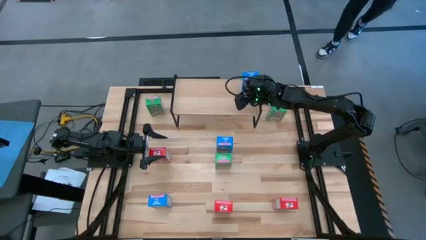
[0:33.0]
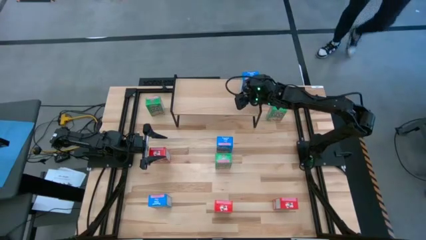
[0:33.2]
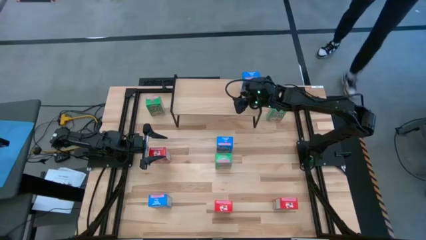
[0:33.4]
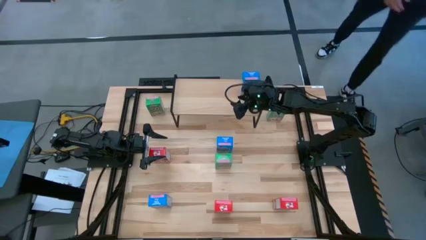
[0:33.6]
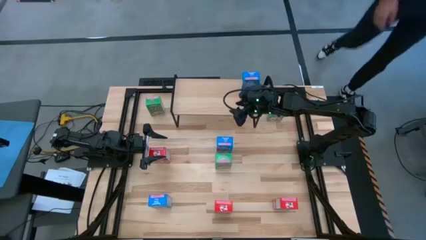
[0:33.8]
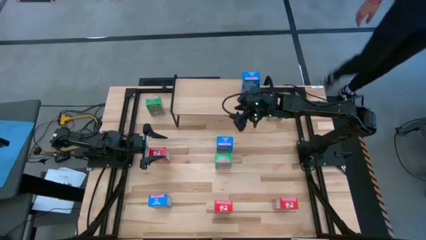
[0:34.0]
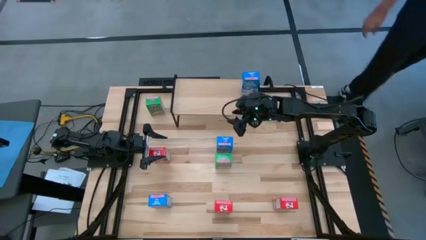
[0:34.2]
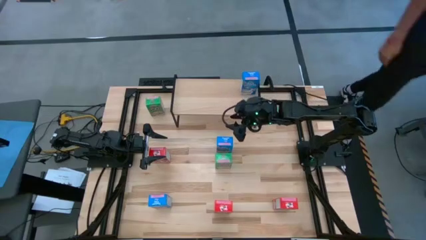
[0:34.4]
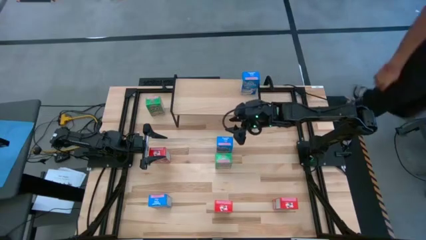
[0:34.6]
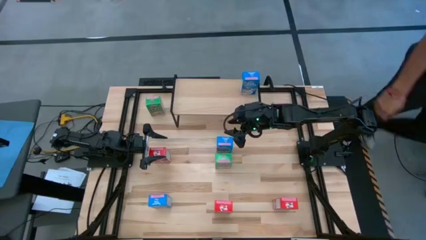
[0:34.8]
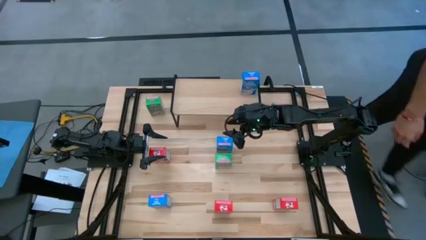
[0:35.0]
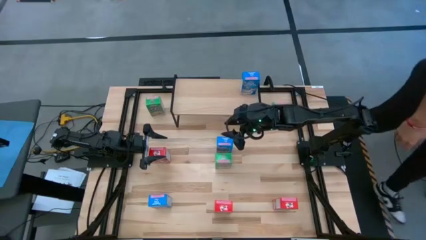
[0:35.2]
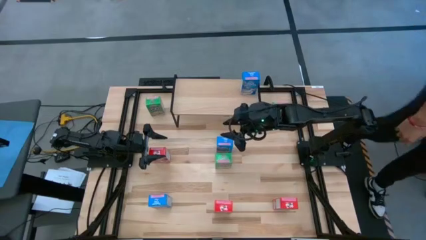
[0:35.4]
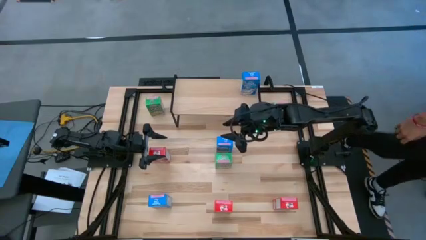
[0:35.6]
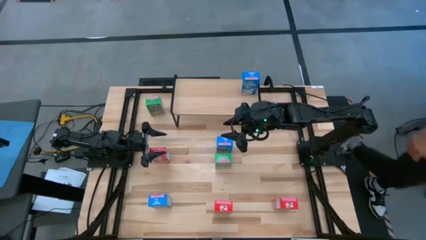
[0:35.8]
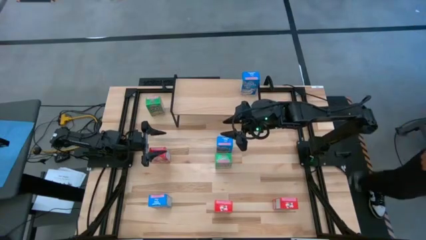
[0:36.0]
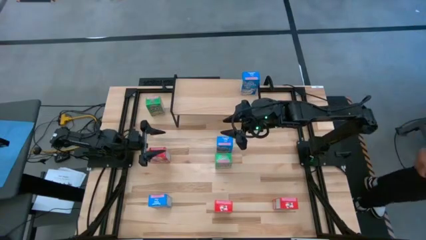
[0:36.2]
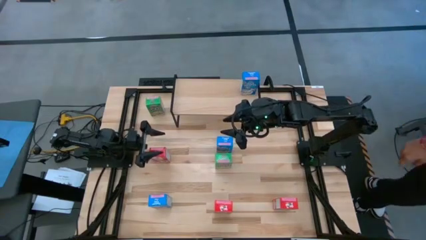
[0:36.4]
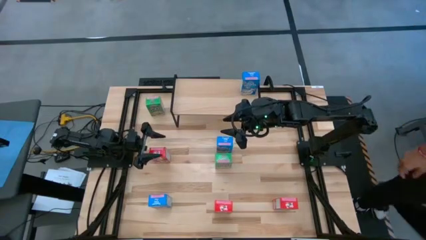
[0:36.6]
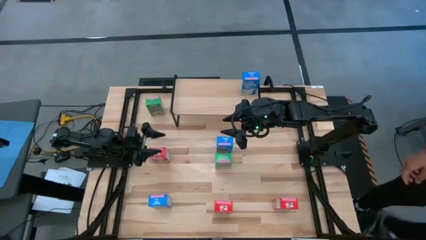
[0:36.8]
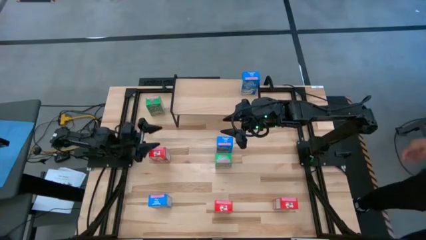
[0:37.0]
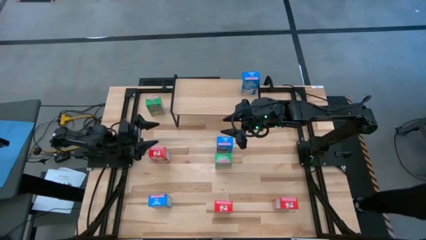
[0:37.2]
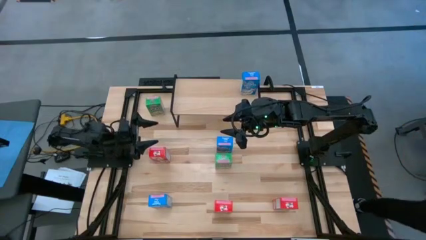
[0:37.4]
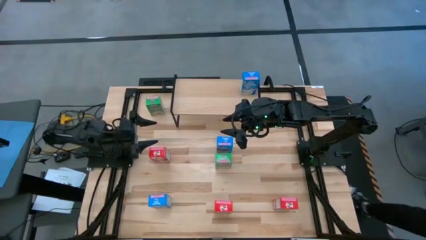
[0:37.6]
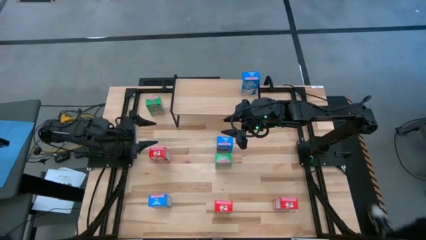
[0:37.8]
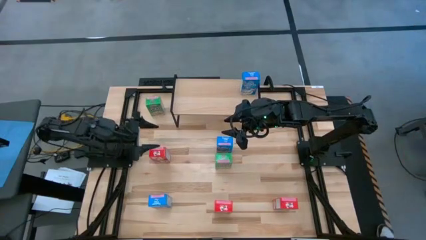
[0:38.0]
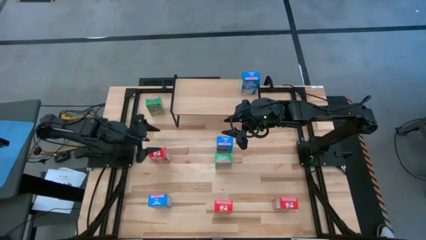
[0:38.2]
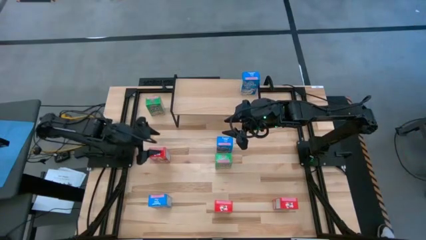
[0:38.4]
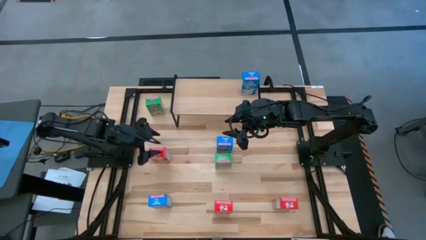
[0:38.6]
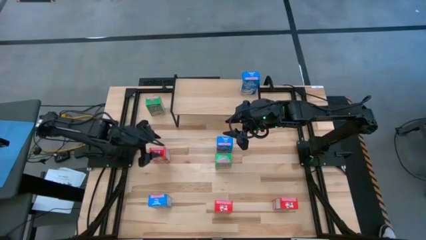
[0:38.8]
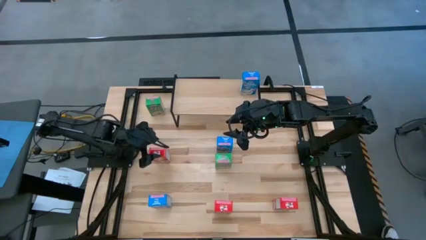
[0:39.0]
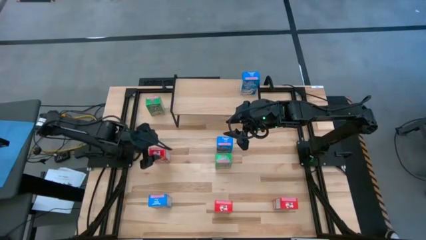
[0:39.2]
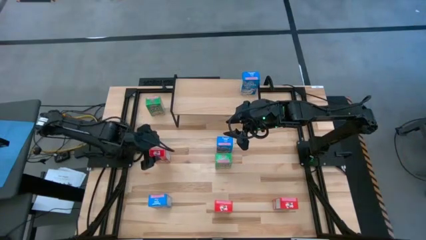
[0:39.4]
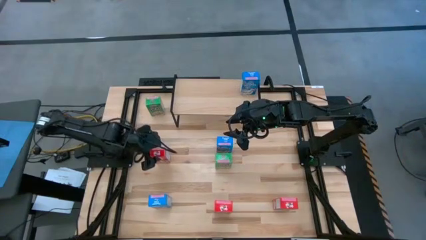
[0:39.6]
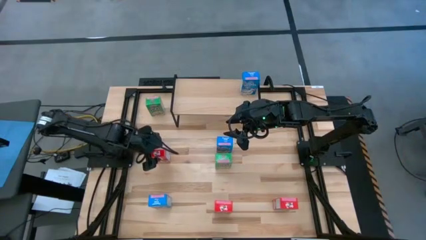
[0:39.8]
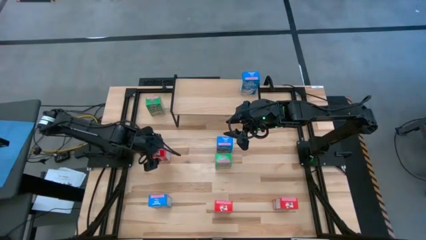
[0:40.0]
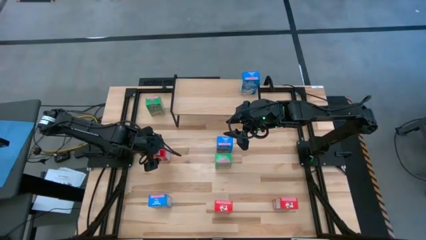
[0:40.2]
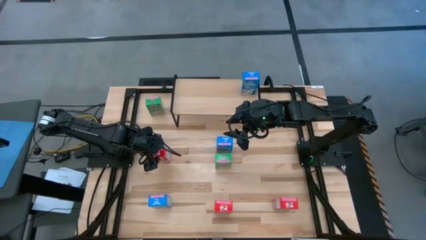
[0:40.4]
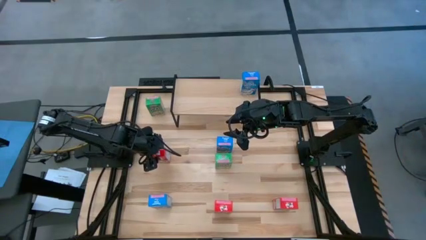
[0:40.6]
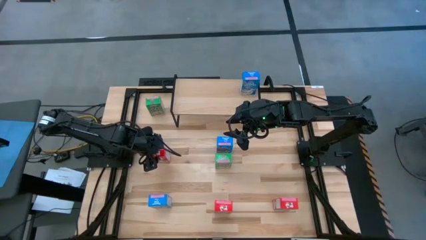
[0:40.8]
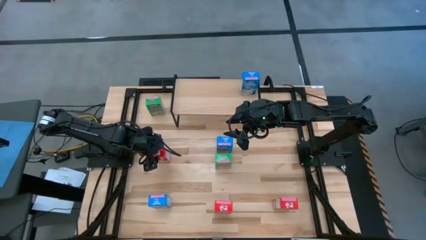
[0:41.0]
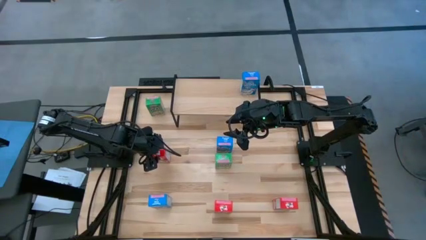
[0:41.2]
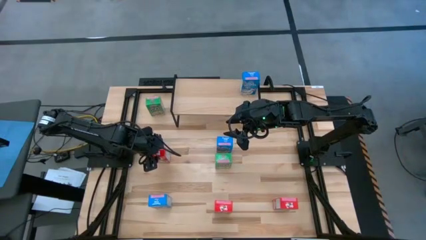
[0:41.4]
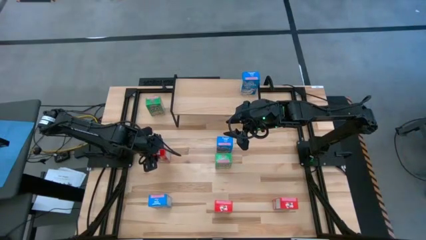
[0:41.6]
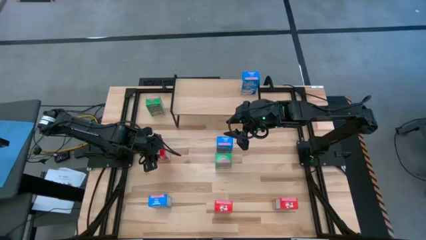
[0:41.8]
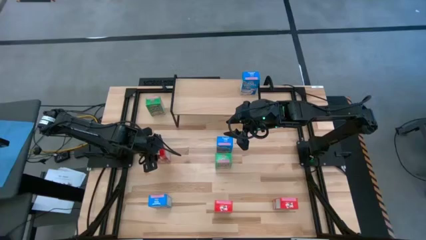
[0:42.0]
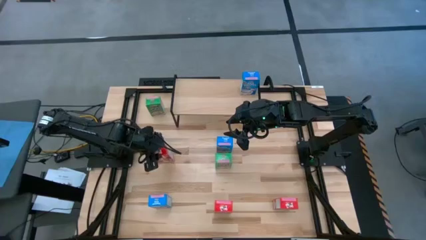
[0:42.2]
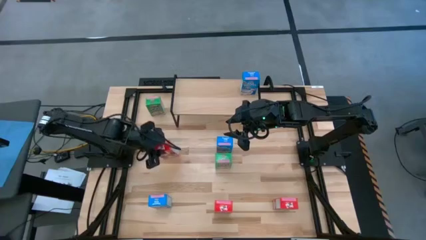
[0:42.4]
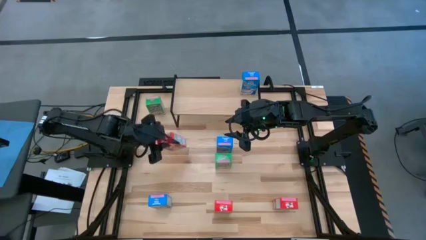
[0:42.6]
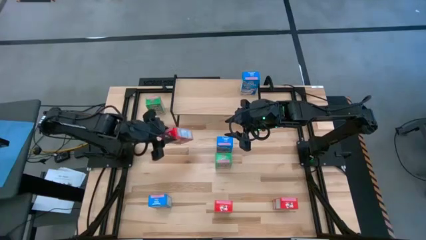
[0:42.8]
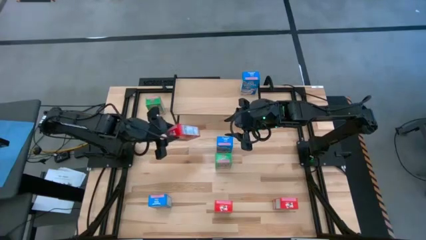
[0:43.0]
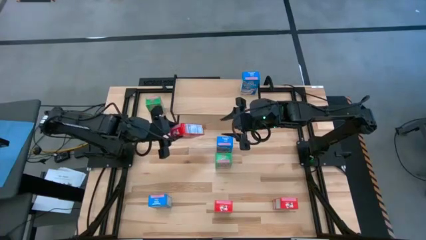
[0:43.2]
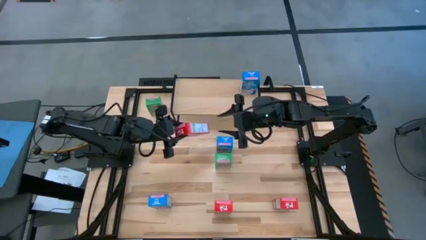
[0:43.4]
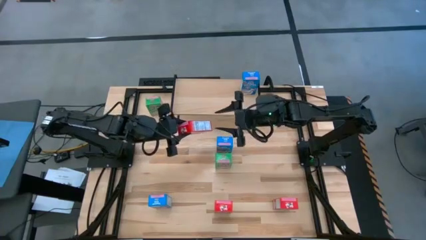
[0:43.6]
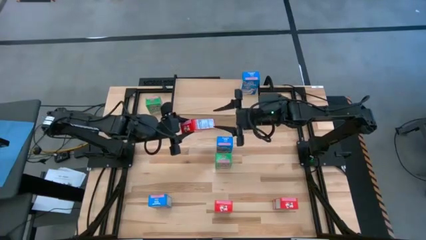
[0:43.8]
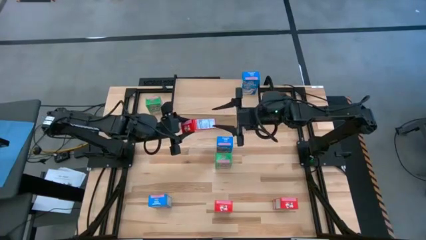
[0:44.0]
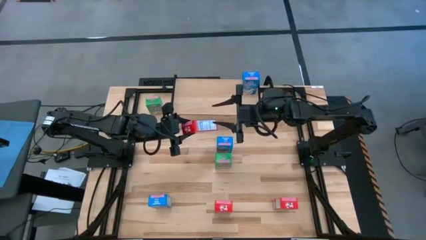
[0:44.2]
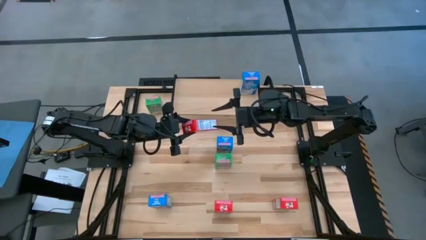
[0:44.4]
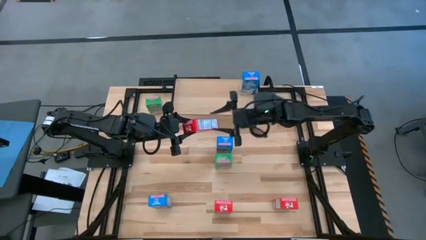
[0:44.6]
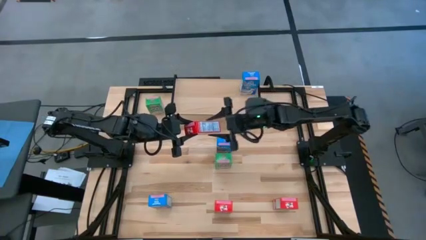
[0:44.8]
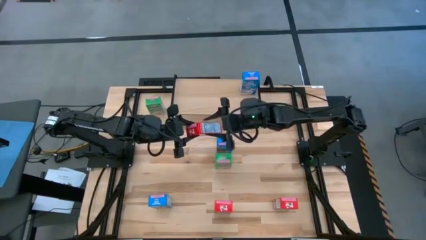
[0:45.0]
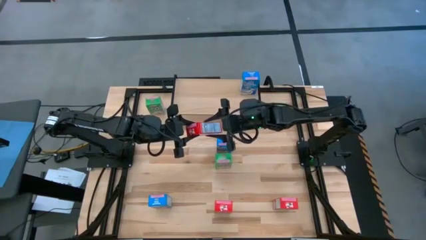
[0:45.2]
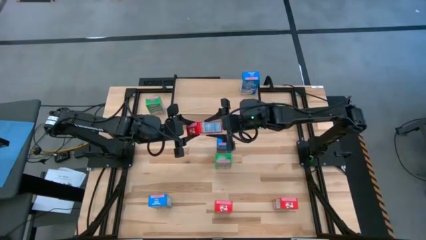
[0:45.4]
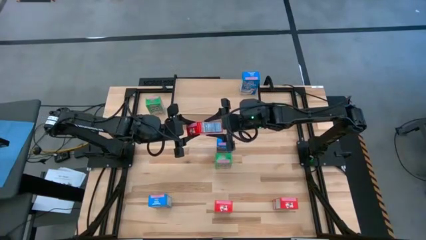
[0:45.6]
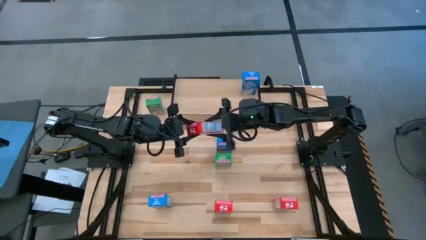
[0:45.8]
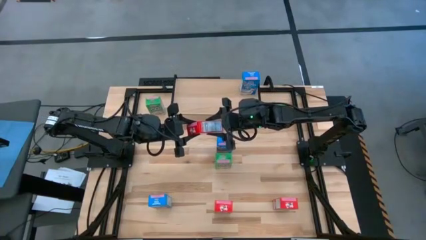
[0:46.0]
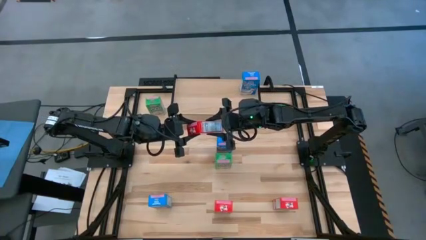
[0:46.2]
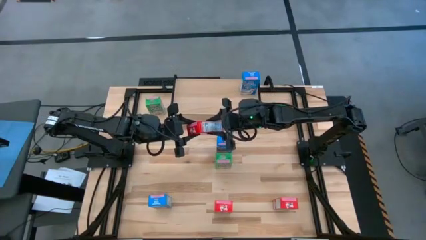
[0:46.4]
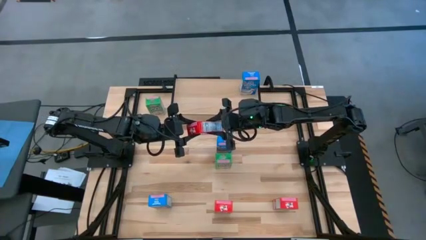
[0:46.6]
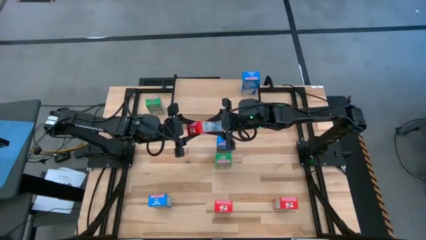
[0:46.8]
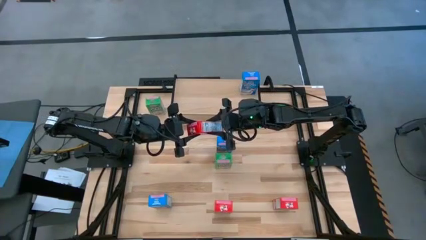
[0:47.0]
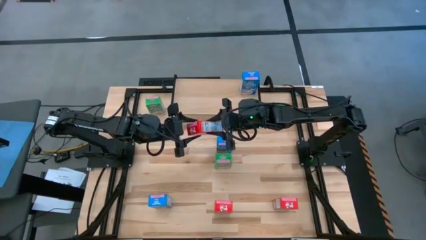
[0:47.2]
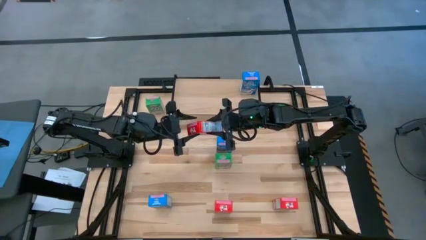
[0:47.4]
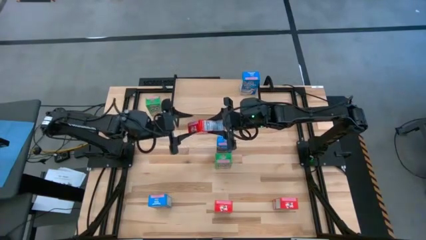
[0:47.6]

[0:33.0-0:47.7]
Task: Stack cereal on shelf
Put the top red cereal box on the shelf

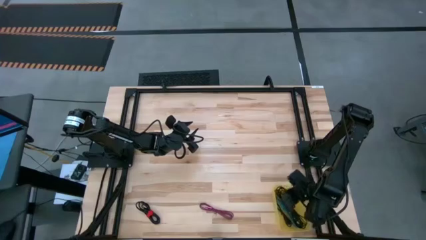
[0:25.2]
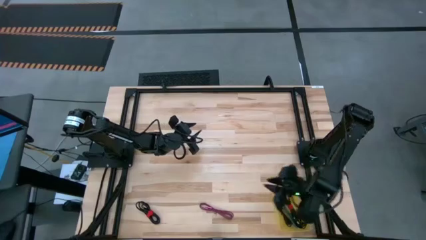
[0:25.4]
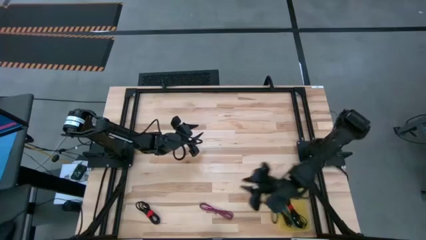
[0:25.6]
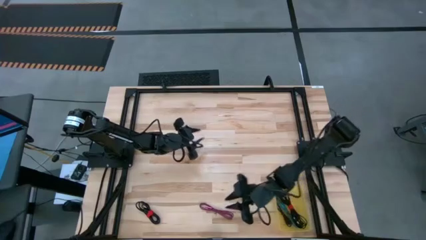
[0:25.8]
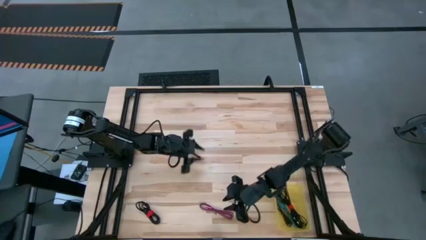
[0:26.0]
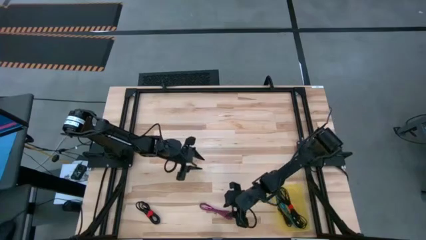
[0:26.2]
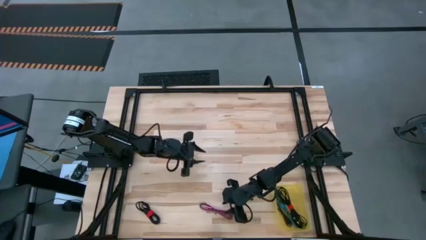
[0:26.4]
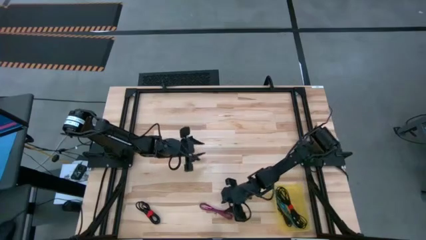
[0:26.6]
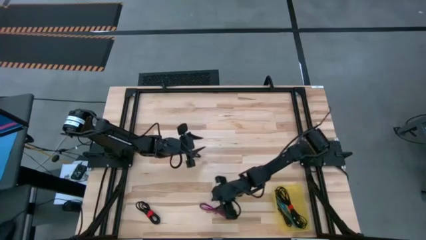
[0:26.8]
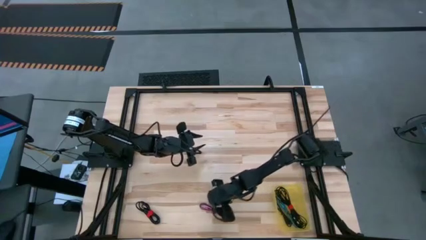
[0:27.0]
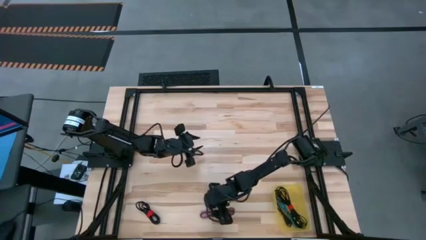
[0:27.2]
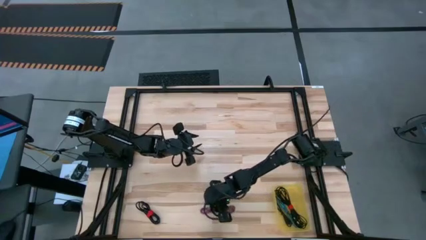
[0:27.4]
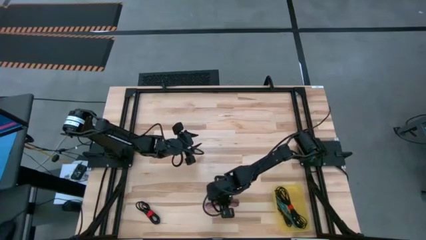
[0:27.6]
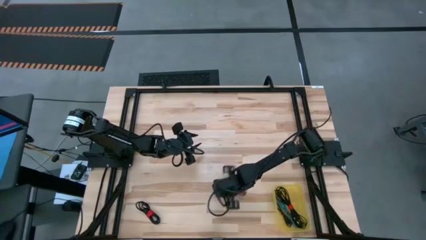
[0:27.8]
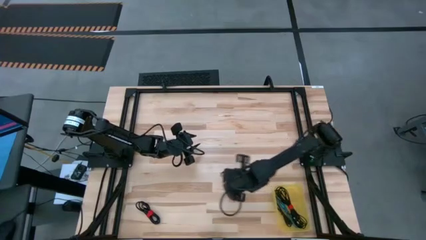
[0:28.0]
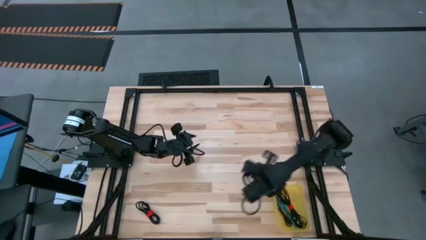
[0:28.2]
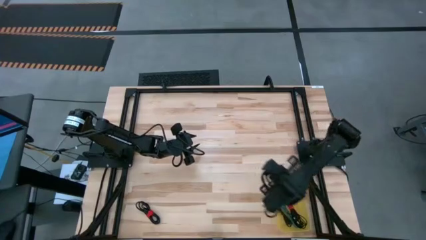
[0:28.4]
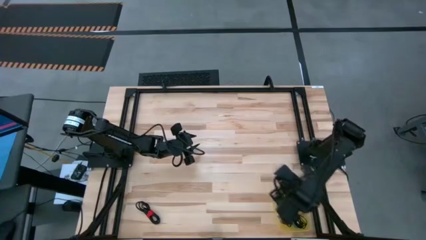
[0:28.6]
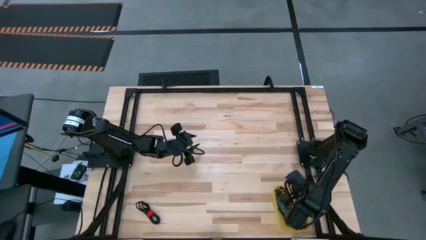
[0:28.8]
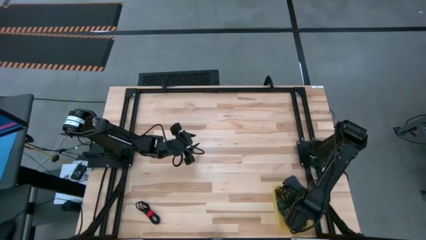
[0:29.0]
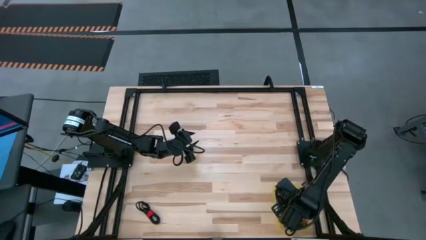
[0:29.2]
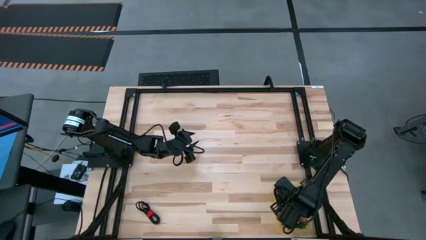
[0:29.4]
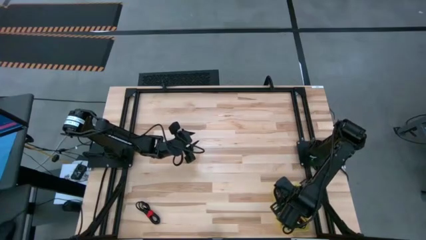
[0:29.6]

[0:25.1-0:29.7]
Task: Pick and place USB-C Cables
Put the pink cable charger into the yellow bin
